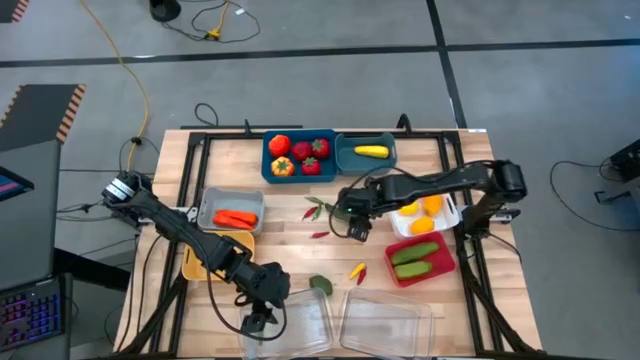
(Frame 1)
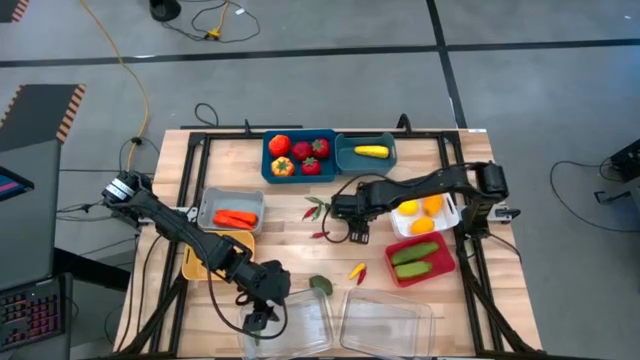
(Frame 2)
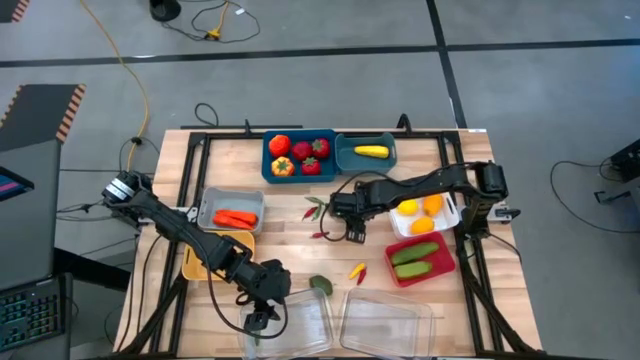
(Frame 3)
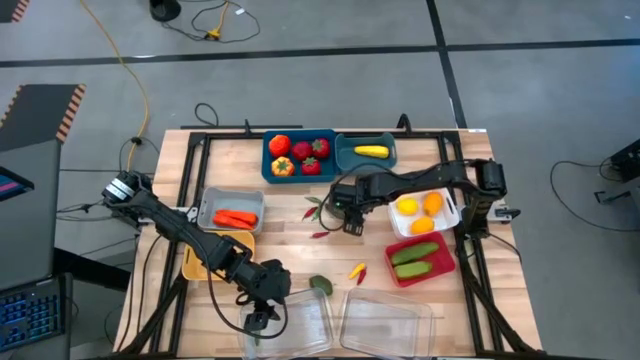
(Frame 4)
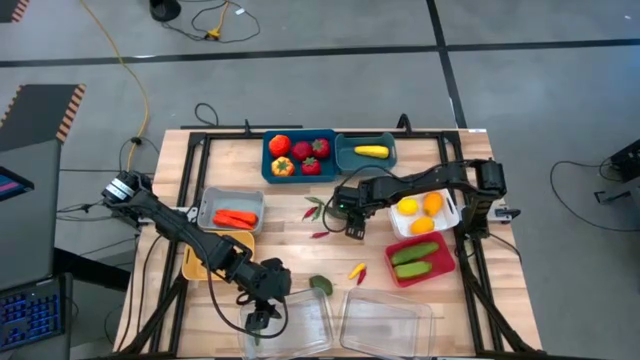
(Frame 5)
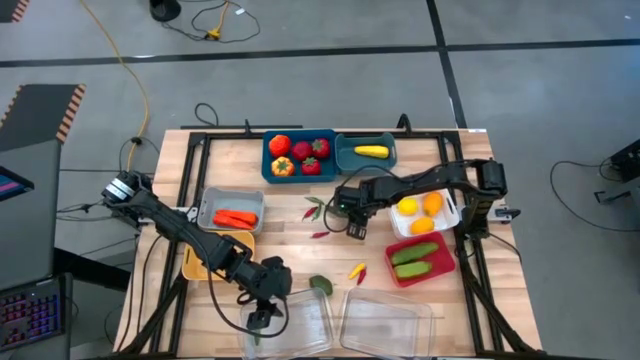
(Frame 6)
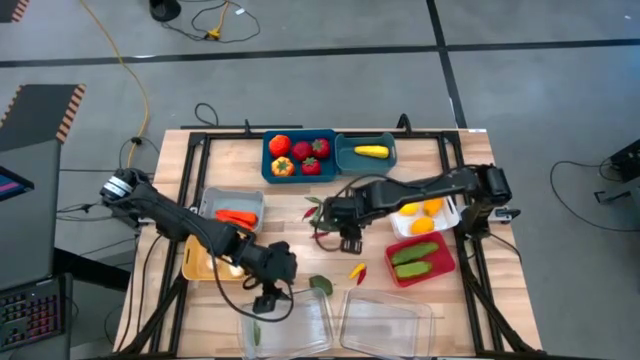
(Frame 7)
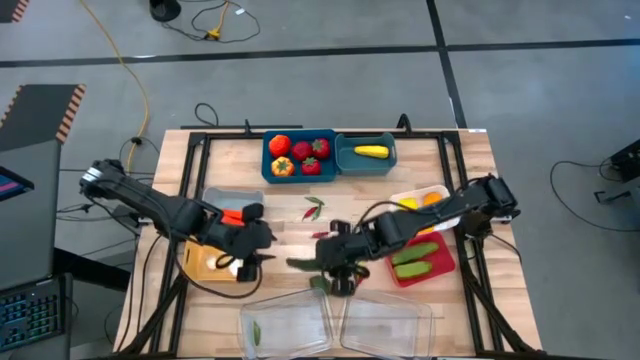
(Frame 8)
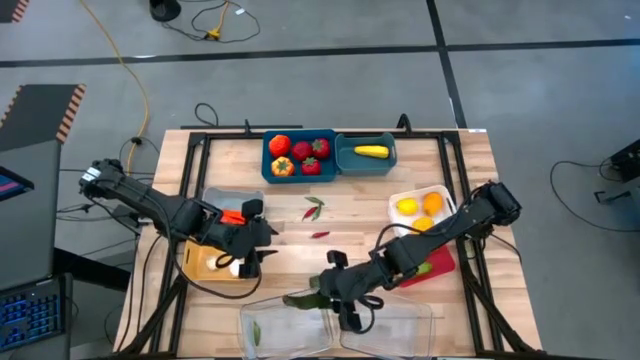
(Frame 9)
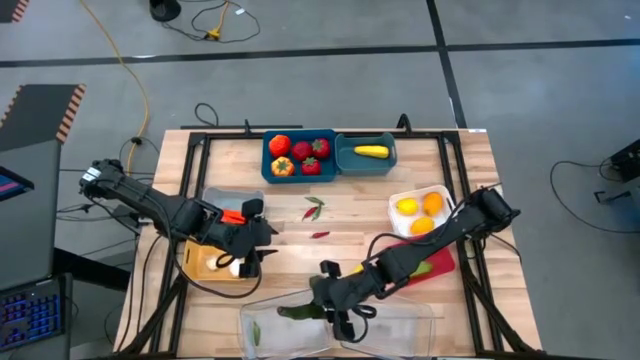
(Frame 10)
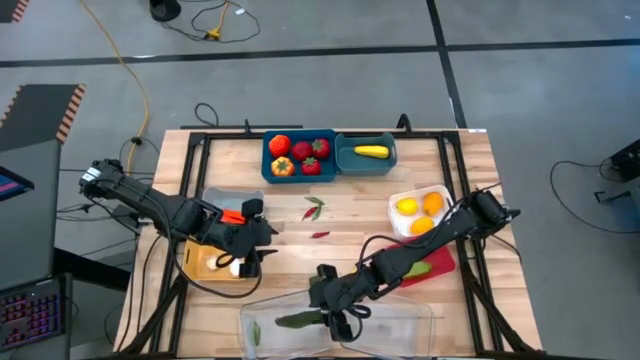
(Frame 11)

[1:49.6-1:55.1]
Task: Sort produce into baskets
Put the green chili pepper into the left transparent bin

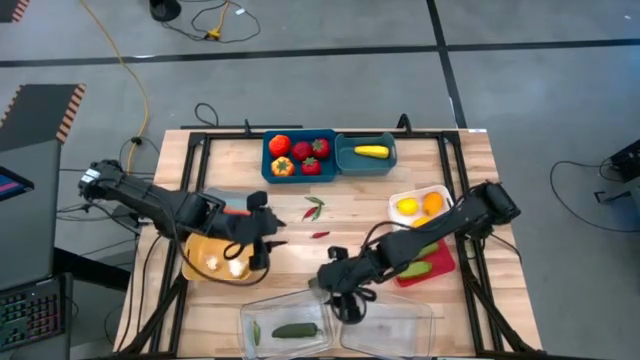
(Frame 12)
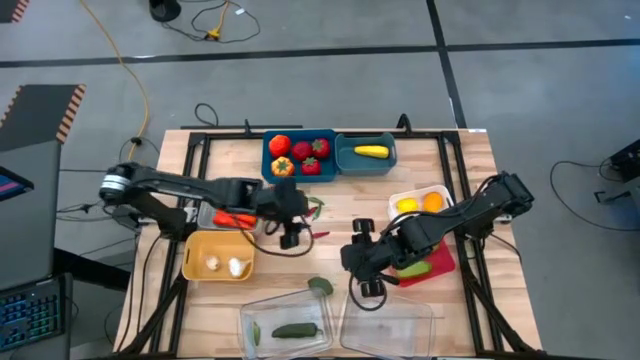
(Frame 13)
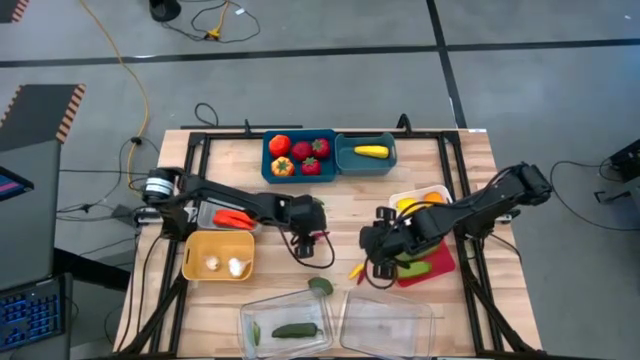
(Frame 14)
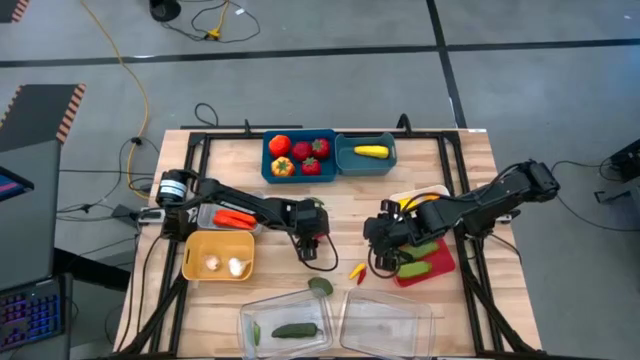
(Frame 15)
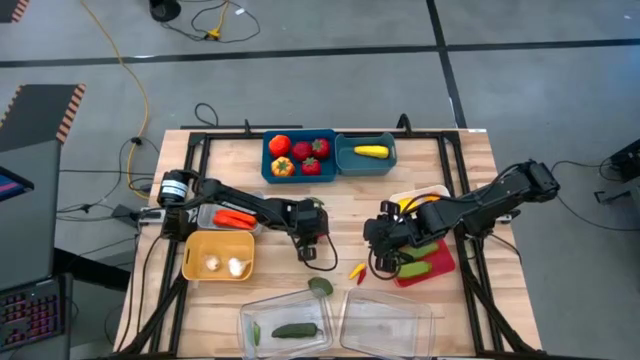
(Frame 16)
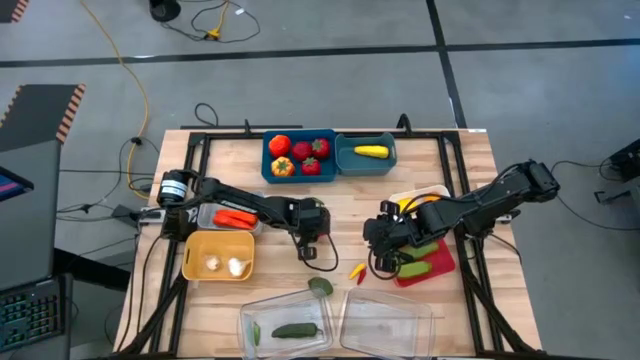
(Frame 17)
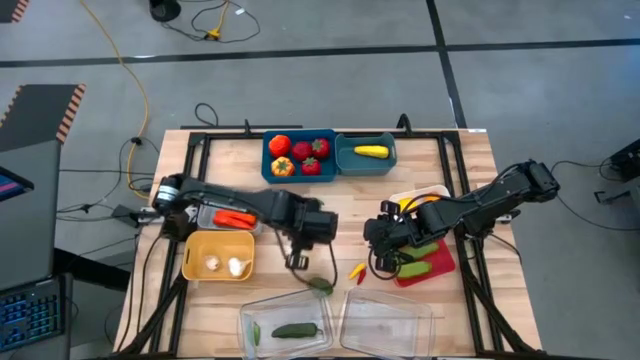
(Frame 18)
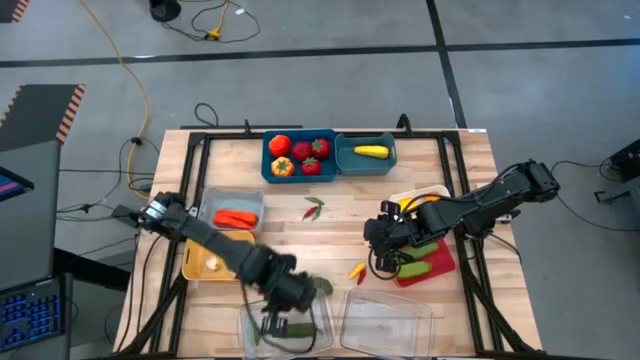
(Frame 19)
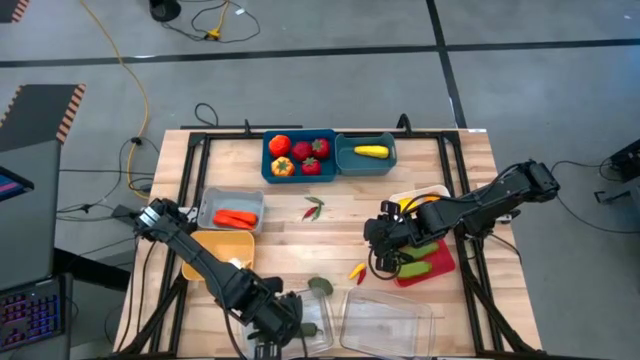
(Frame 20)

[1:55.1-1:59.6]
Put the red chili into the bottom left transparent bin

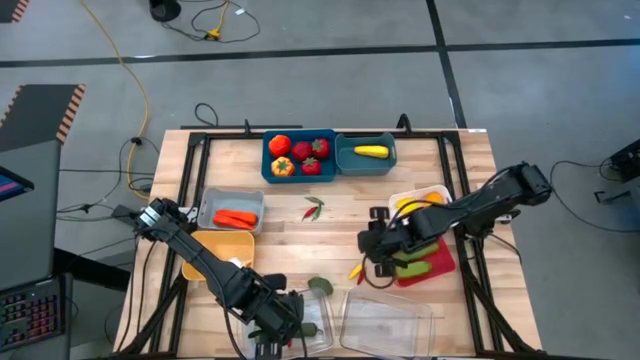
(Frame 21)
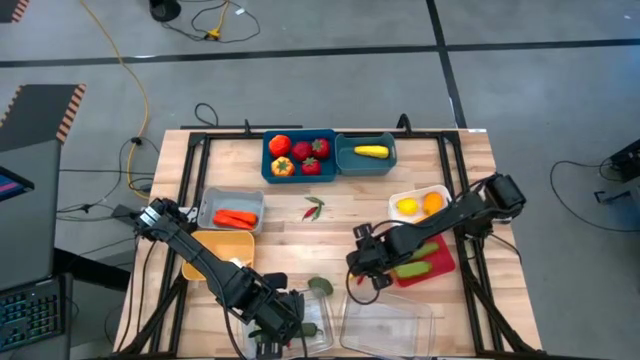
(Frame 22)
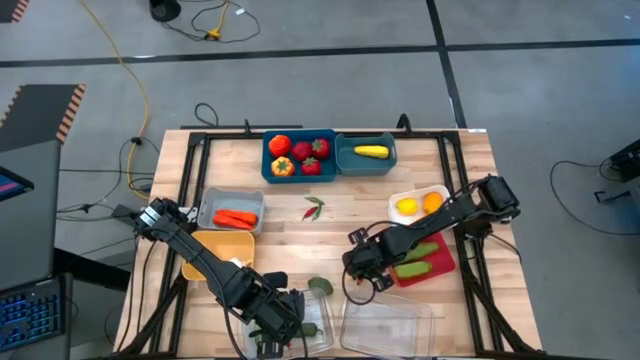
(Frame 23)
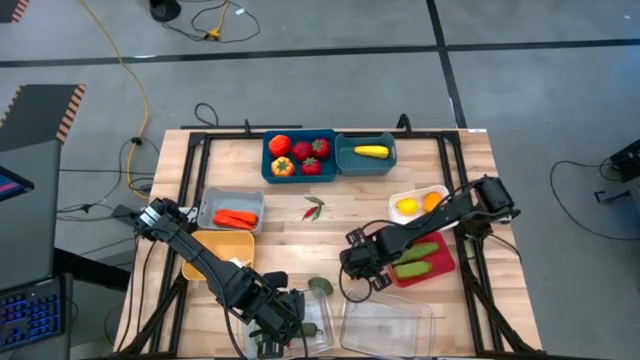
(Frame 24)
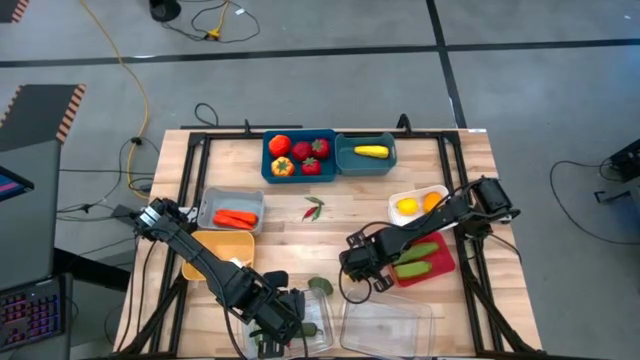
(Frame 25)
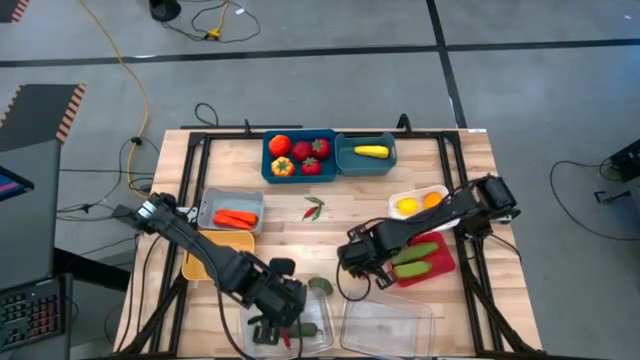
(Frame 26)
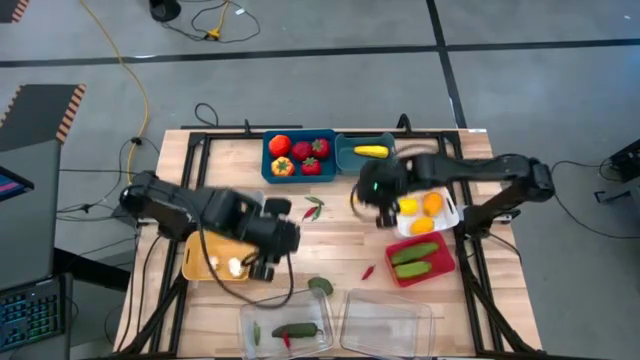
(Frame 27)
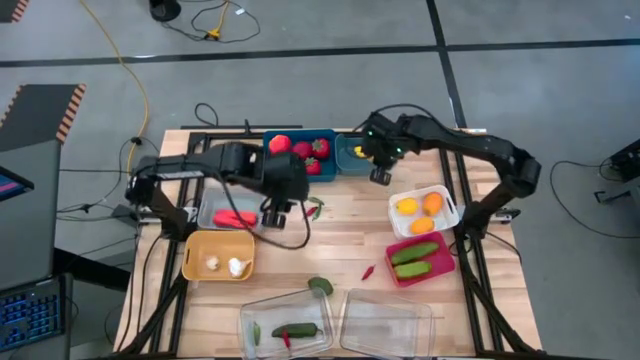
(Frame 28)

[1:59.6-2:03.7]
Put the yellow corn into the dark green bin

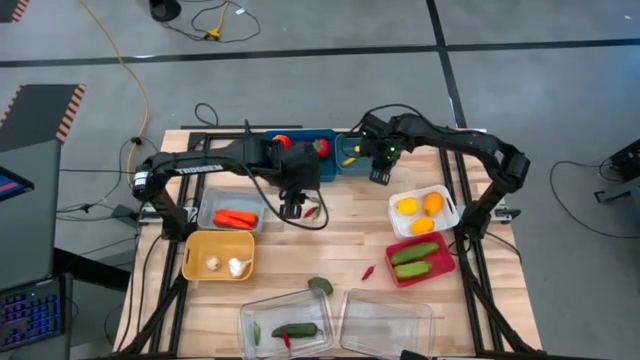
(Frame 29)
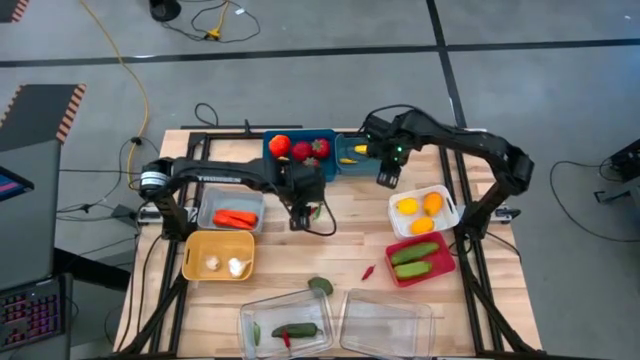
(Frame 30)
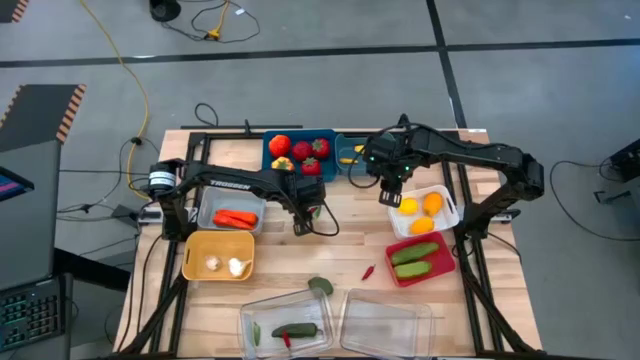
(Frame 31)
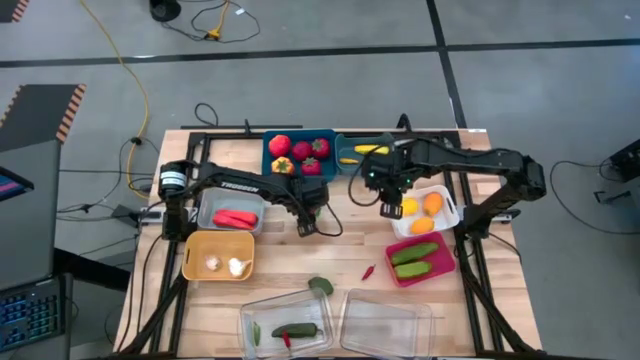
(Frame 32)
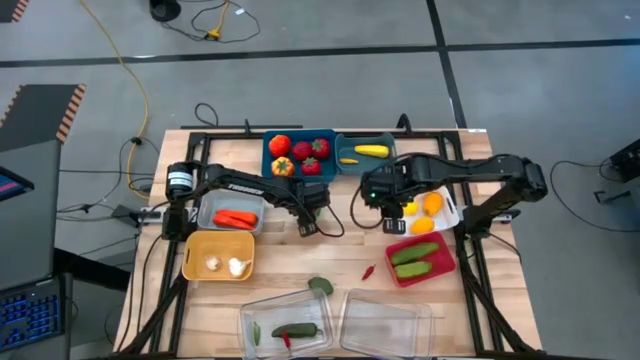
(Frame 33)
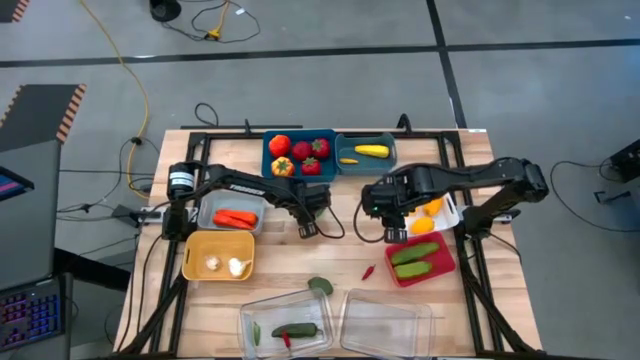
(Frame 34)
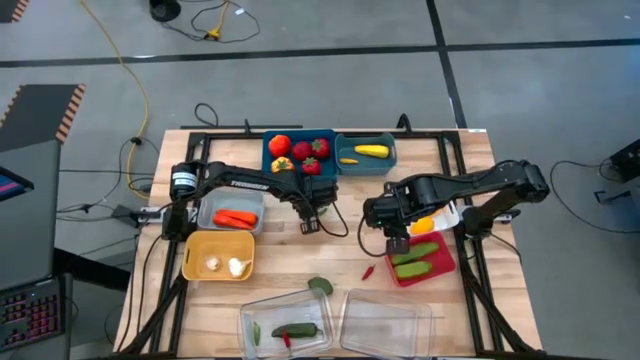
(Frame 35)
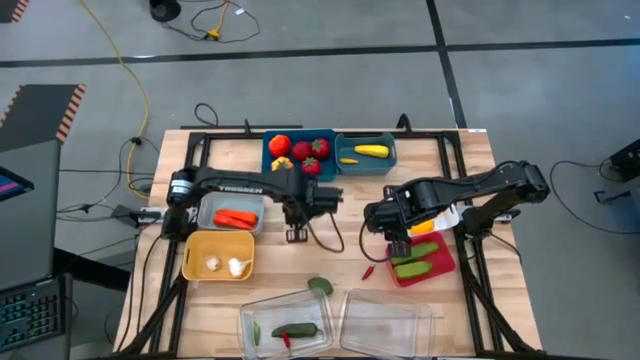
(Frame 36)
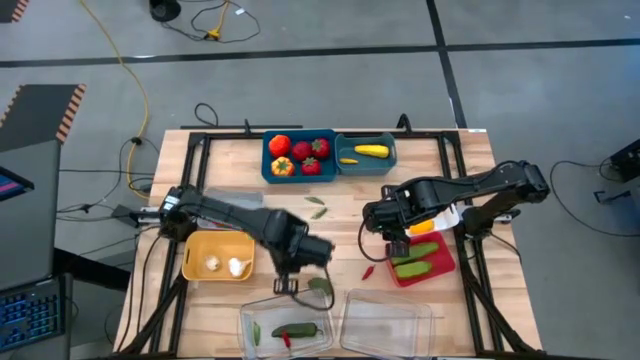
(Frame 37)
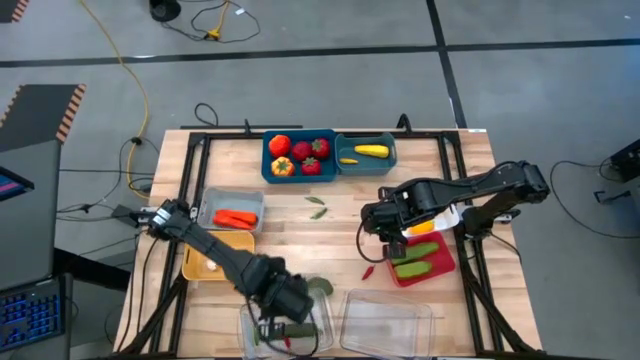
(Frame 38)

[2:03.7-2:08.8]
Put the red chili pepper into the left transparent bin

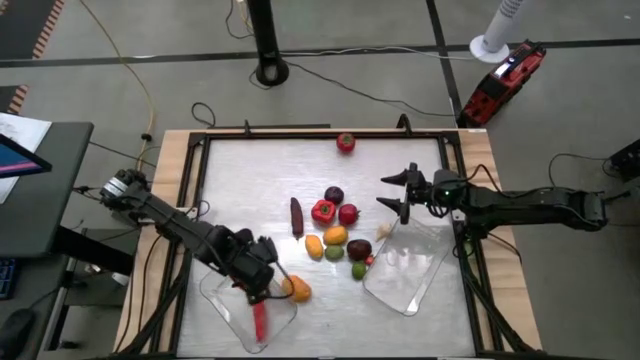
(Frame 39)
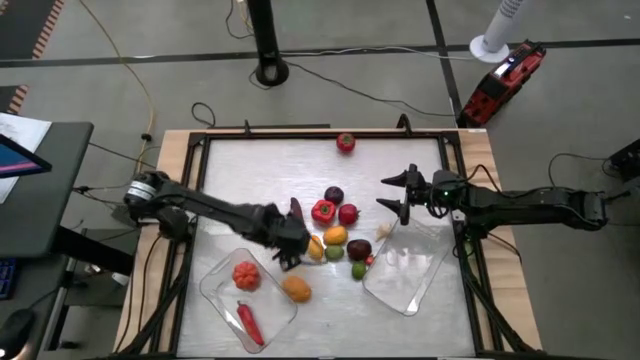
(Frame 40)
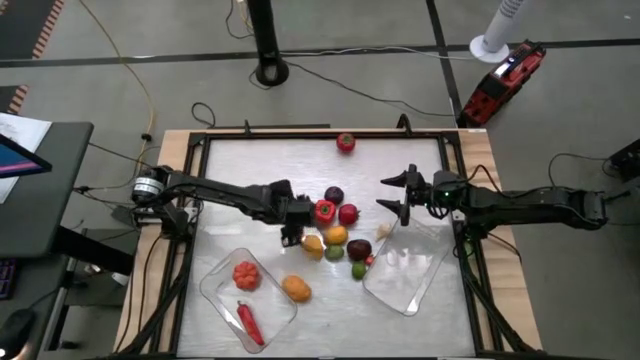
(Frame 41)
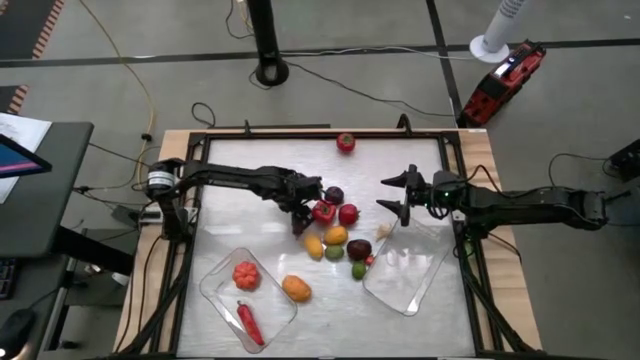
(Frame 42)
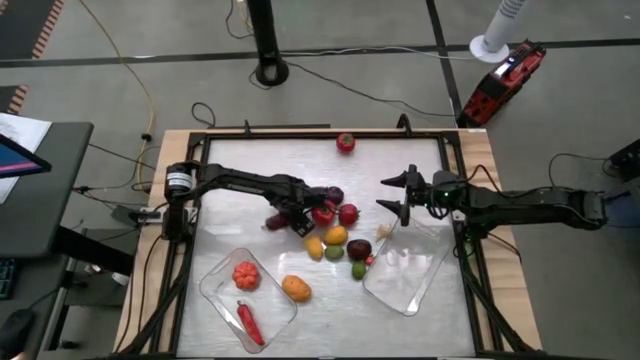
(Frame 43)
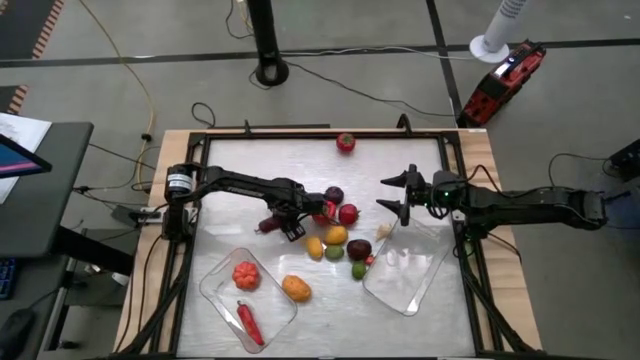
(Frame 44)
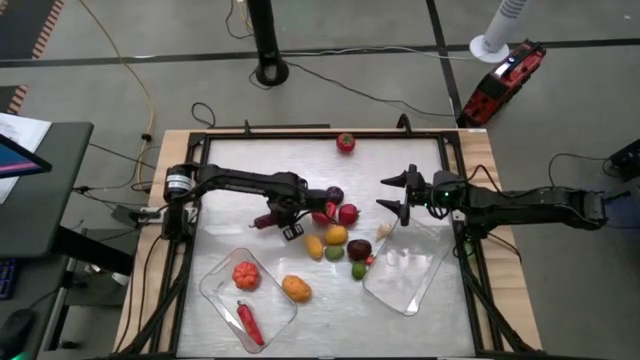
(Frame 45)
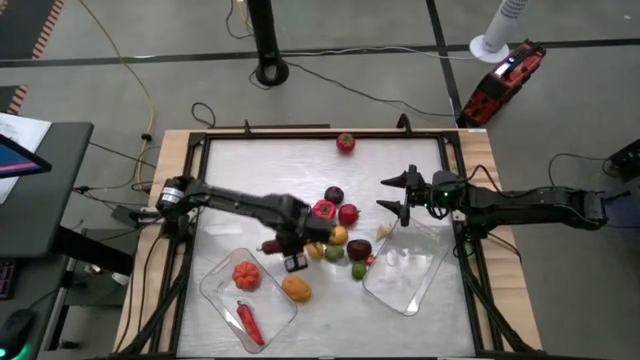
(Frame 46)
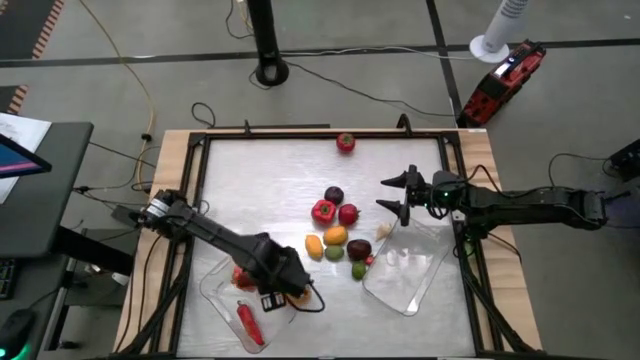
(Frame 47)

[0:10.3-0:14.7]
Task: Sort produce into baskets
Put the dark red chilli pepper into the left transparent bin
